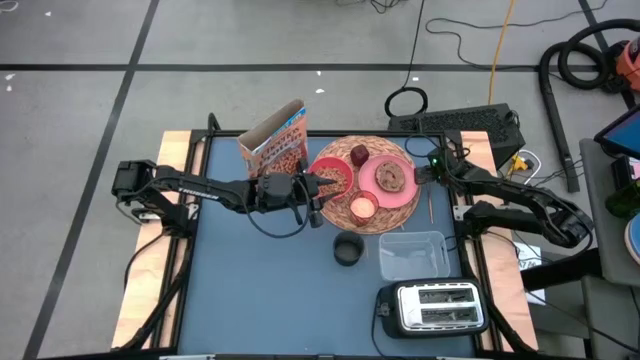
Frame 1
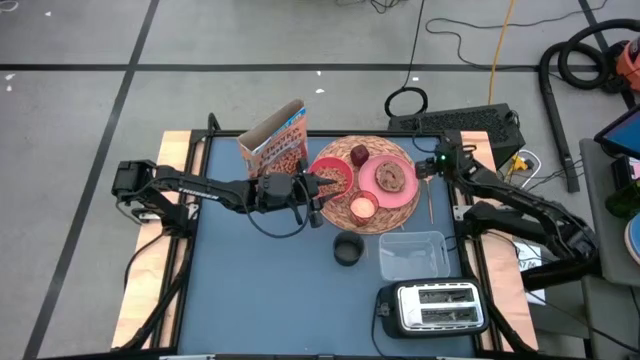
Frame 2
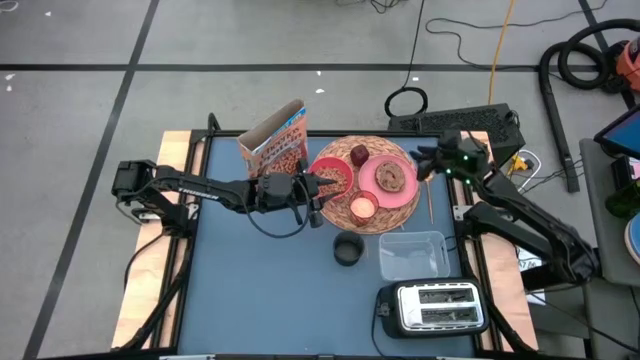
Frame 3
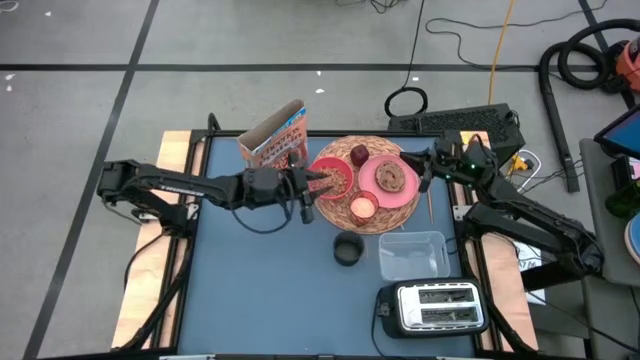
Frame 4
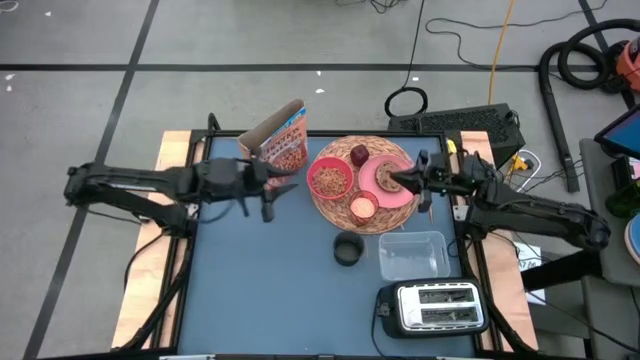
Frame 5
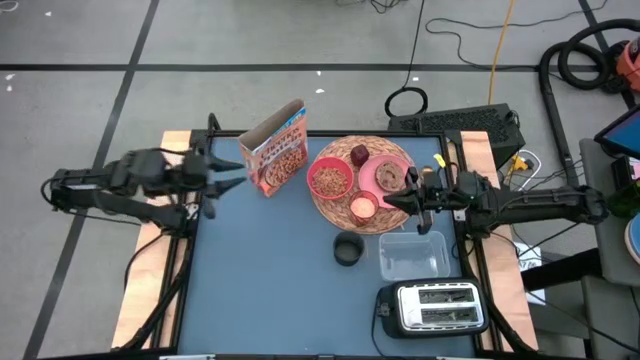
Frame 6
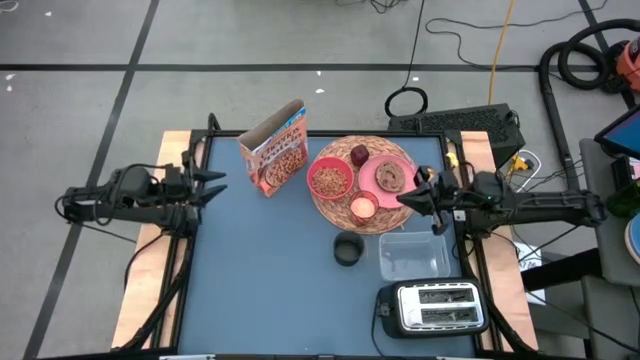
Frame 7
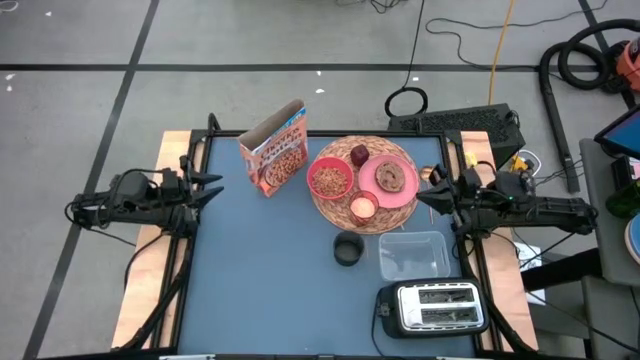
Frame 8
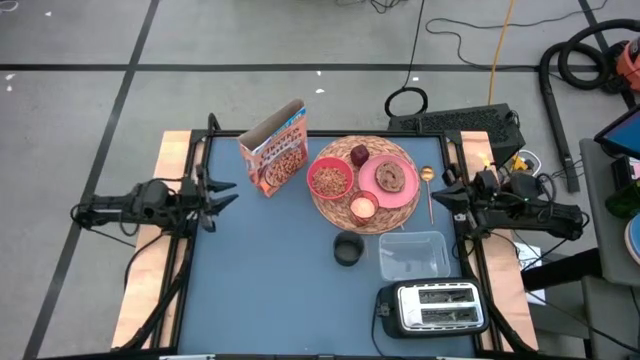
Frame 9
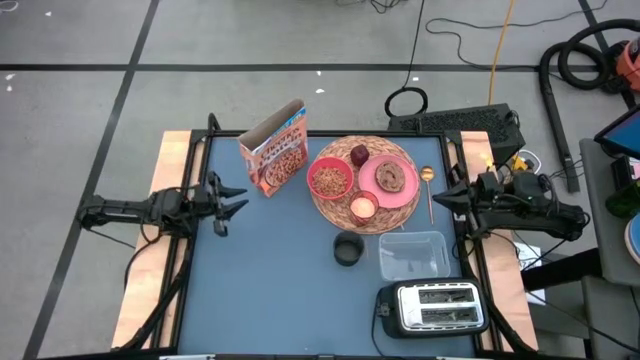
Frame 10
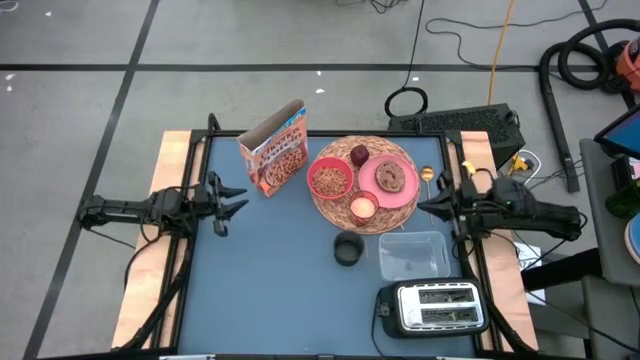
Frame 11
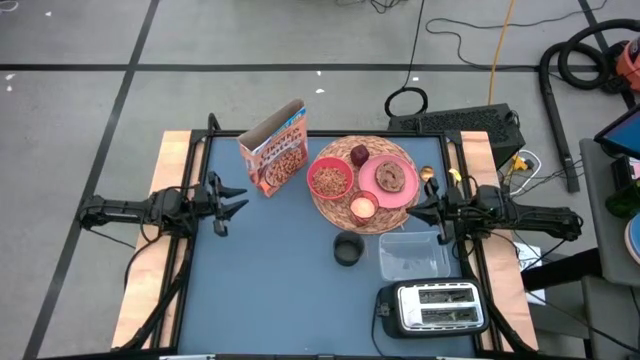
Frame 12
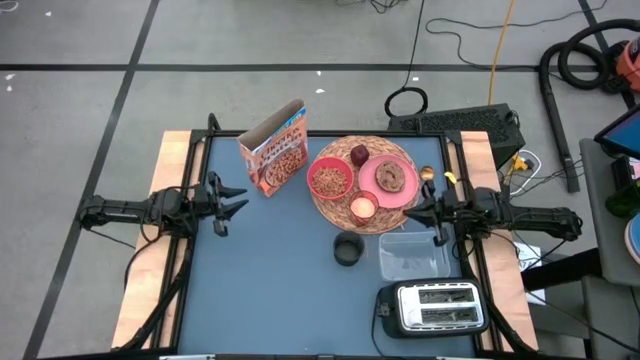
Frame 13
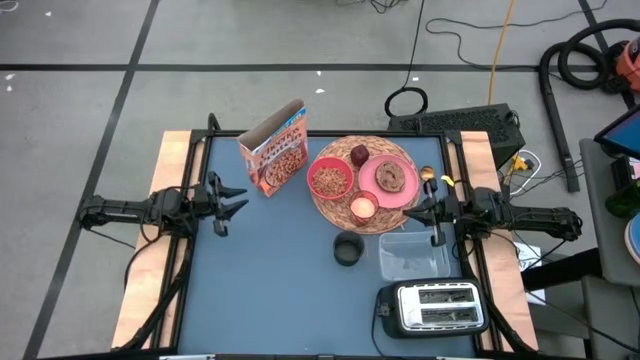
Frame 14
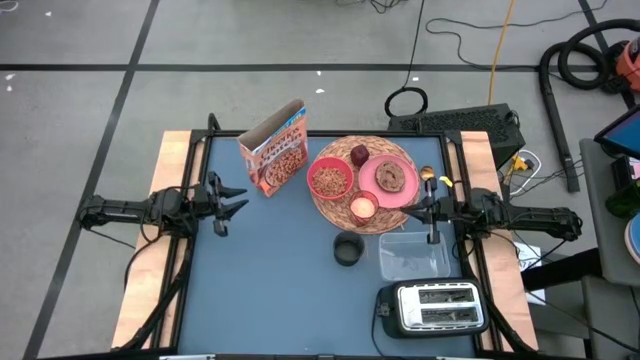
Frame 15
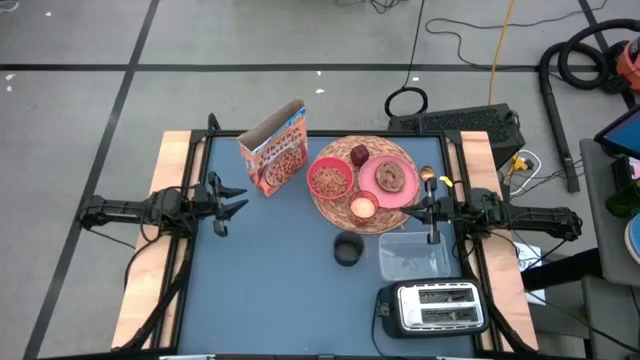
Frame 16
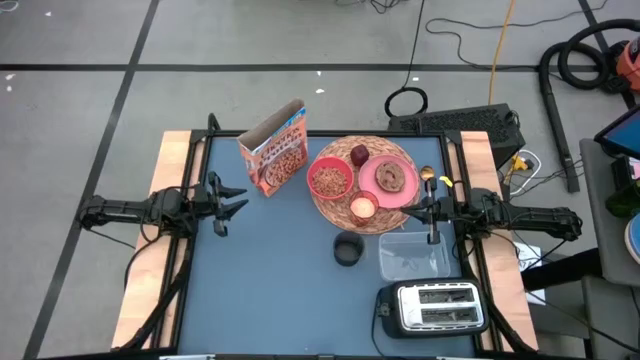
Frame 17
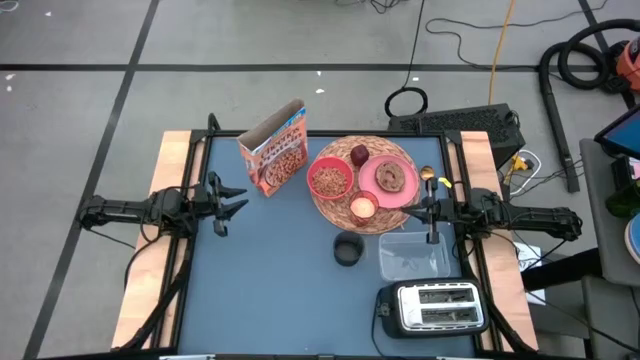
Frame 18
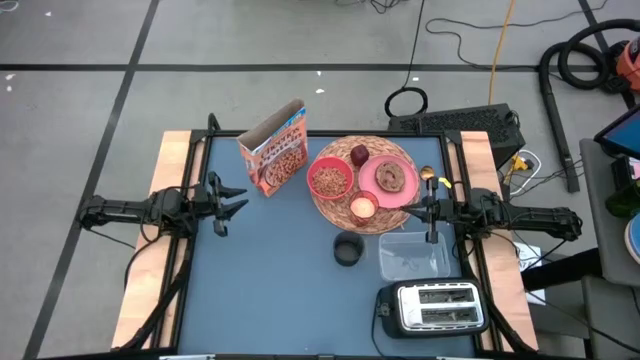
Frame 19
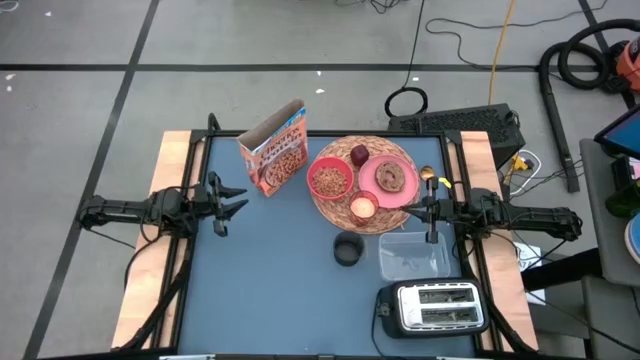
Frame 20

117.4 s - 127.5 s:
Task: Arrange a breakfast setting
Return to Home Position

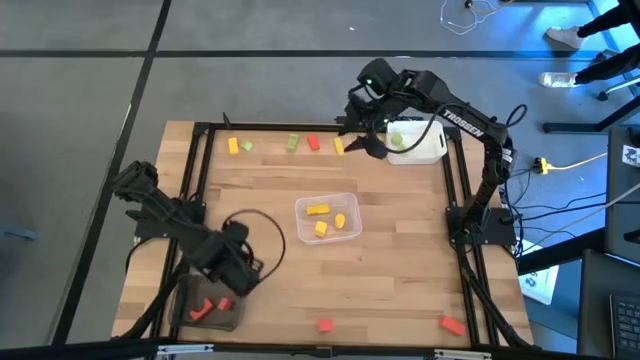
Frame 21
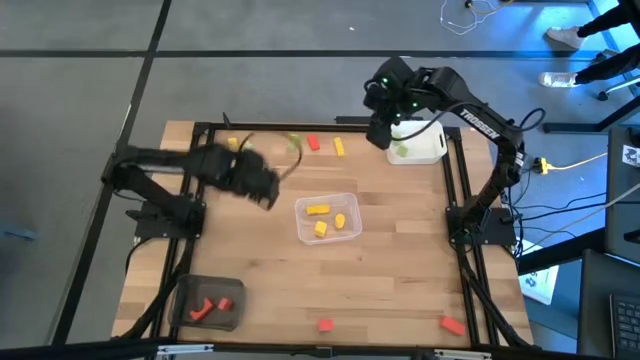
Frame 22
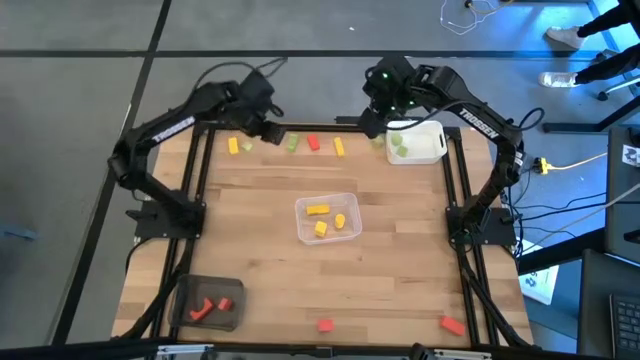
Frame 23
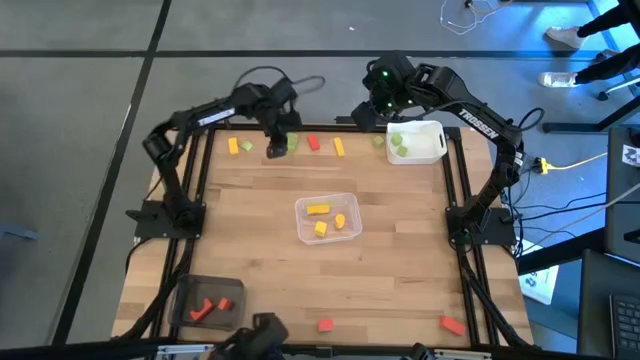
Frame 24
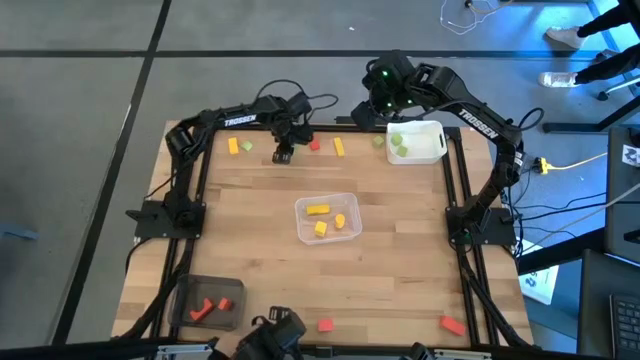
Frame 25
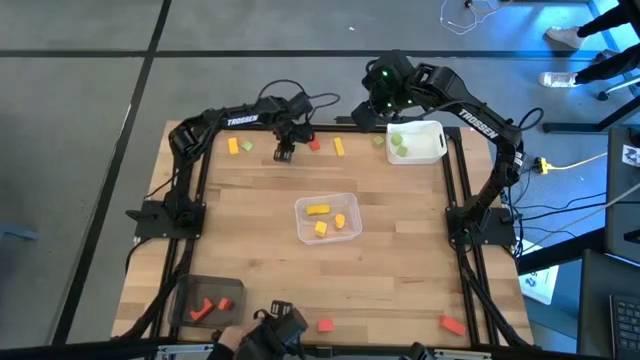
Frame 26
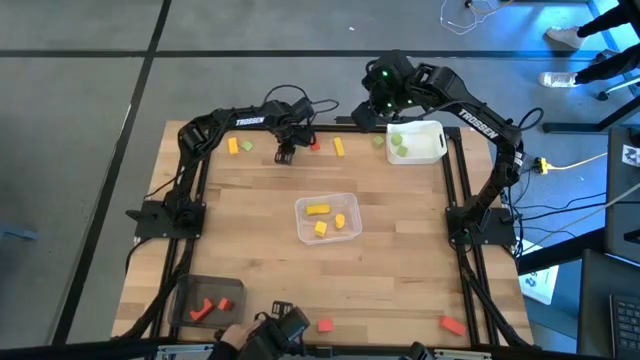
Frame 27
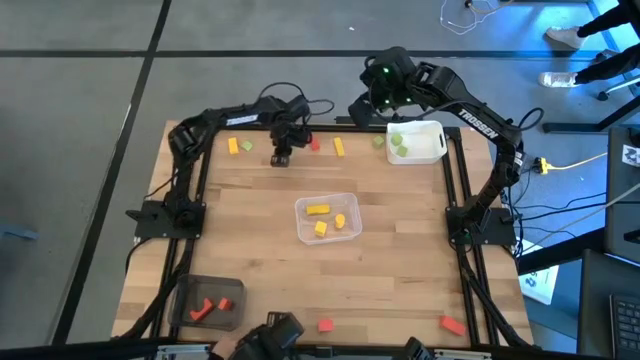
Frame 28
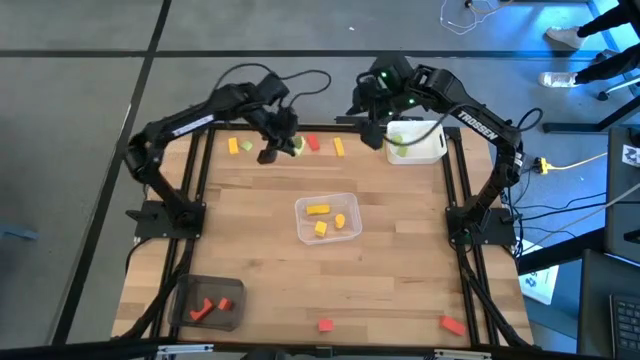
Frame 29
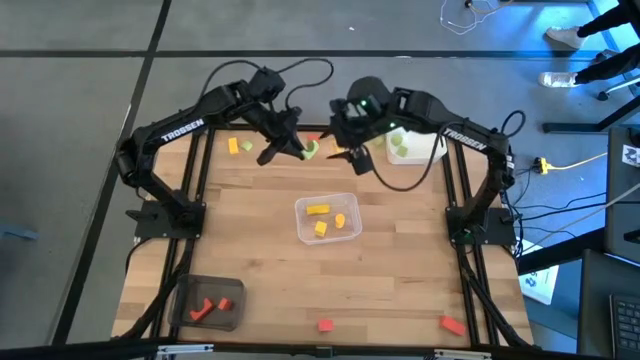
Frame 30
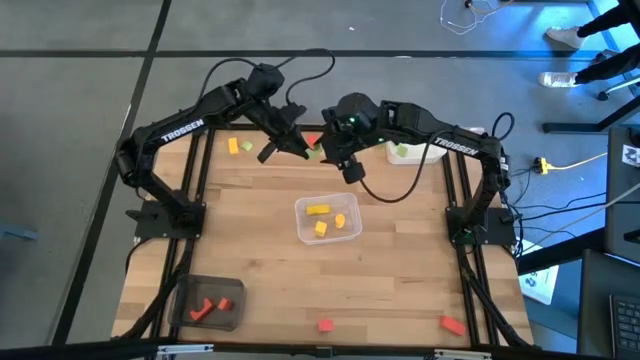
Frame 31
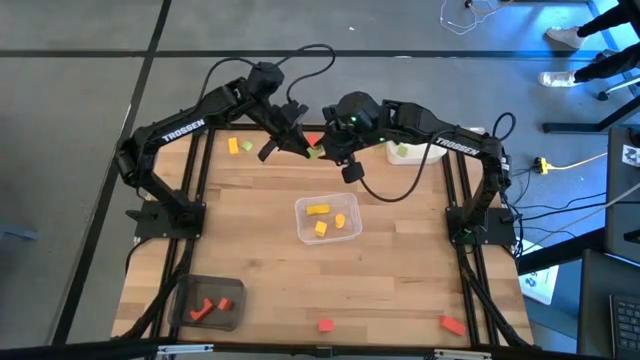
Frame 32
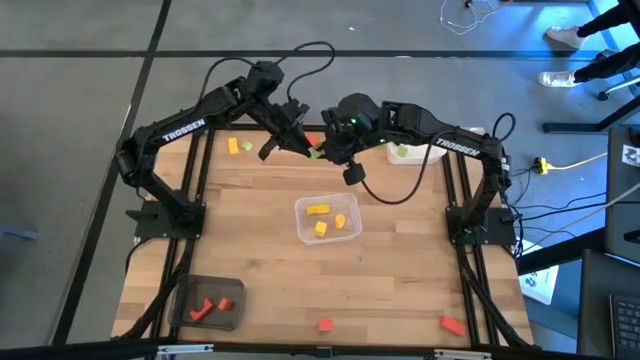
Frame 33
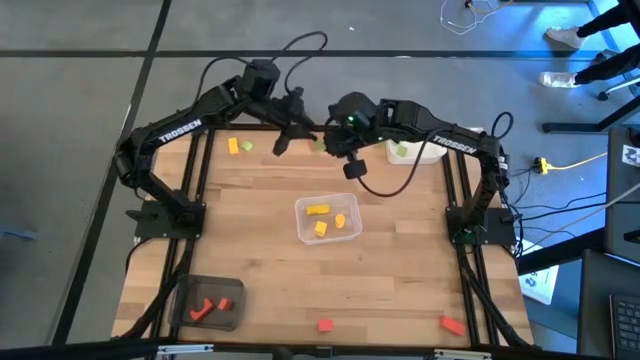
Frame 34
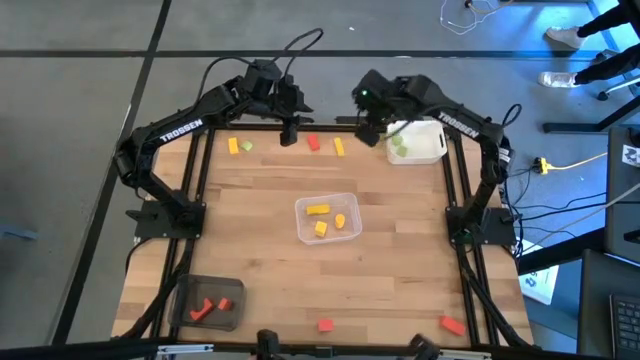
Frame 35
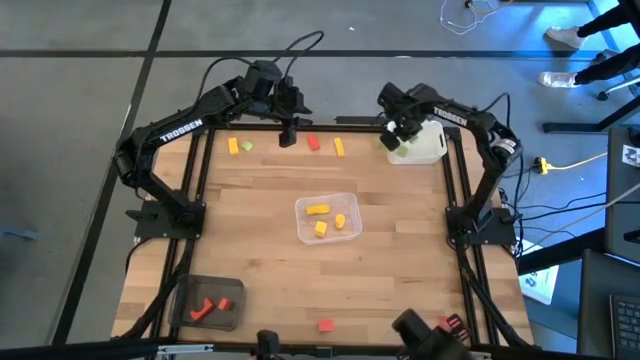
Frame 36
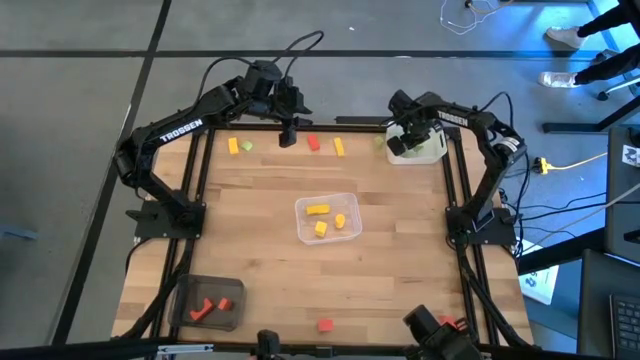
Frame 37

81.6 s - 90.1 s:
Task: Sort & place blocks by color
Put the green block into the white bin
